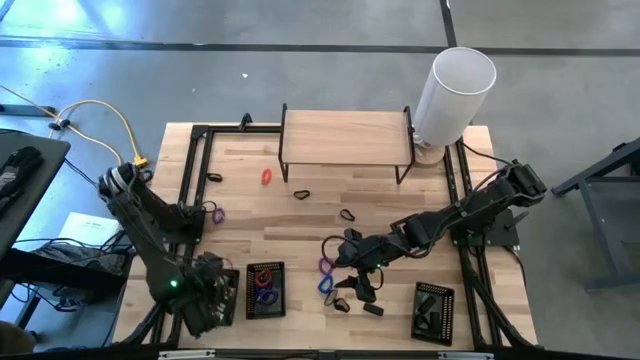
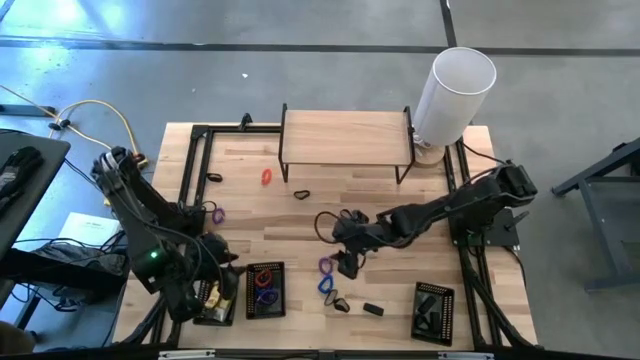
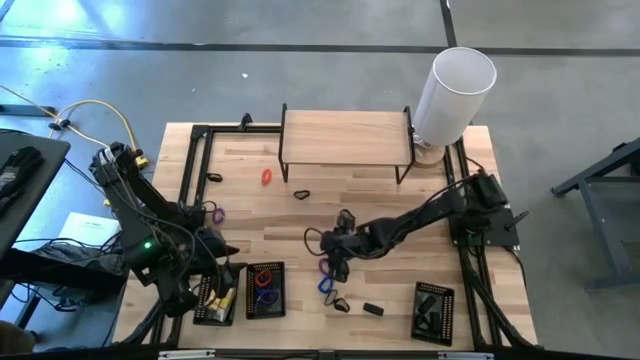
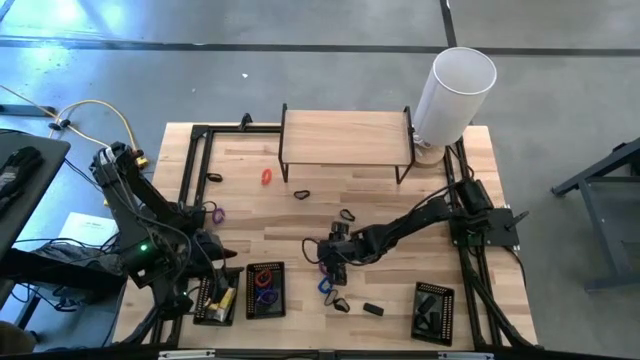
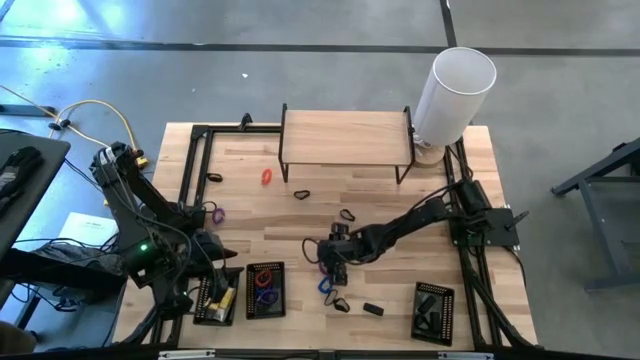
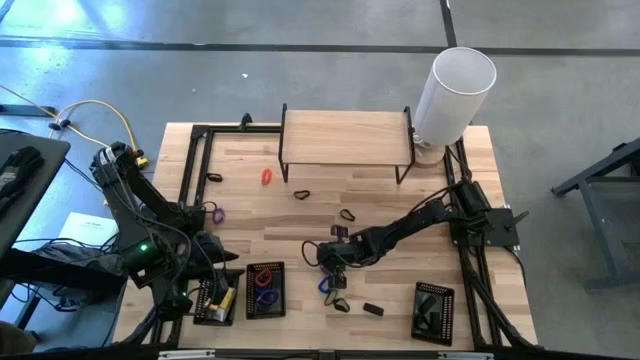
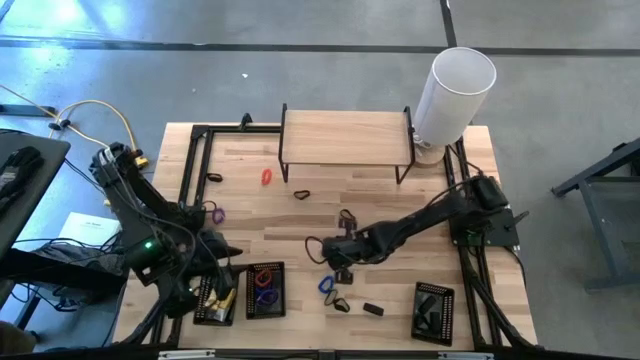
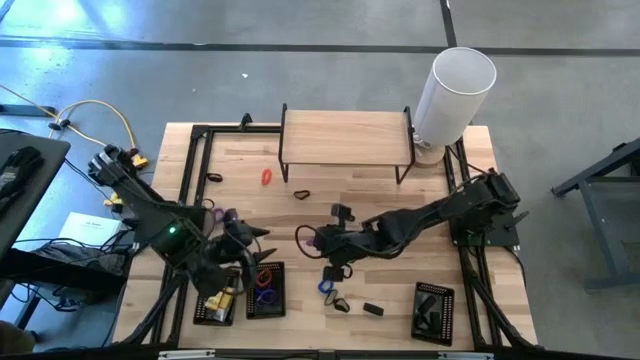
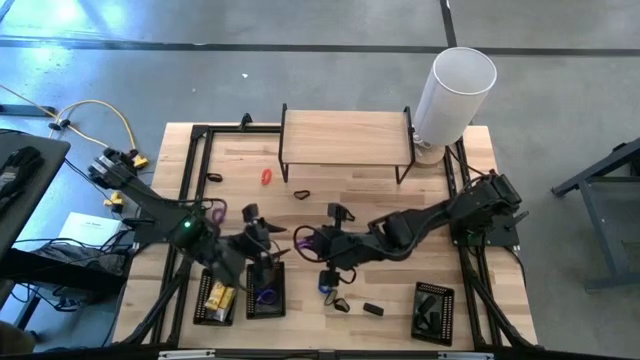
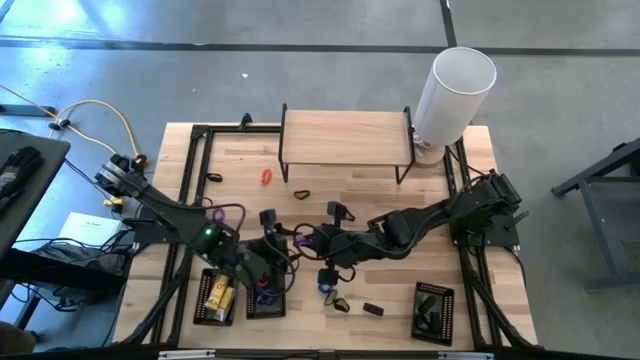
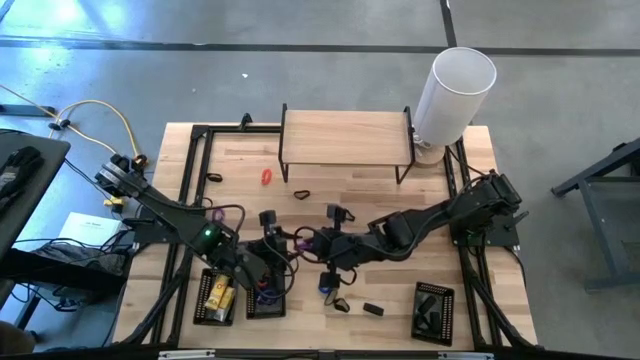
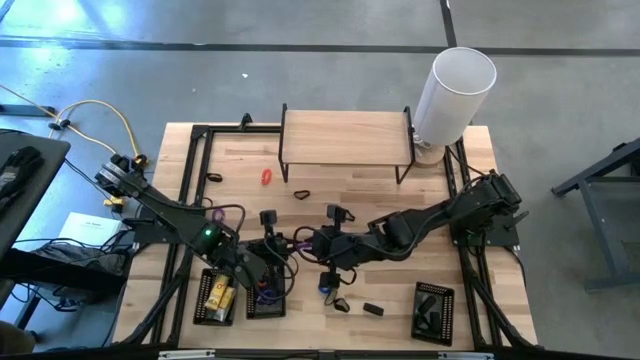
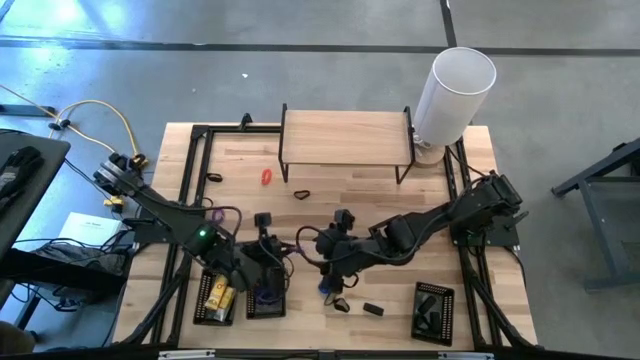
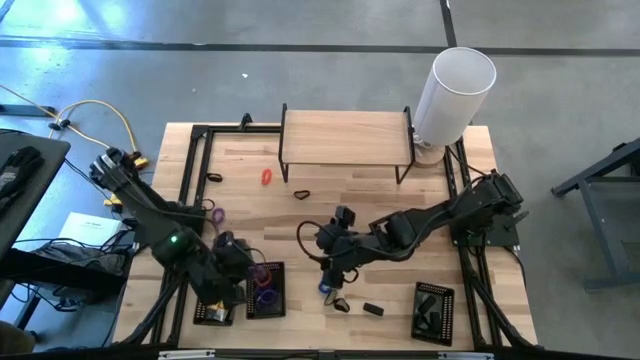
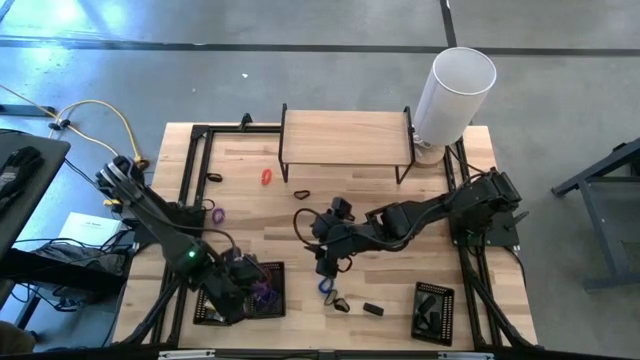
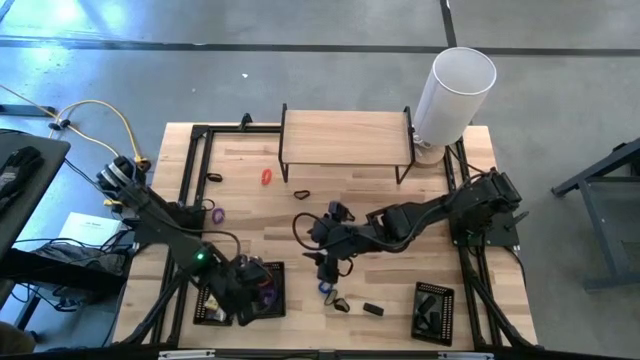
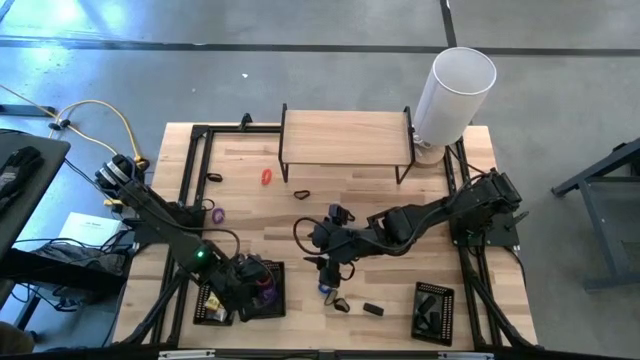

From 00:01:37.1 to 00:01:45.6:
Task: Pick & Place Office Desk Supplies
Put the violet spring key chain into the middle black basket

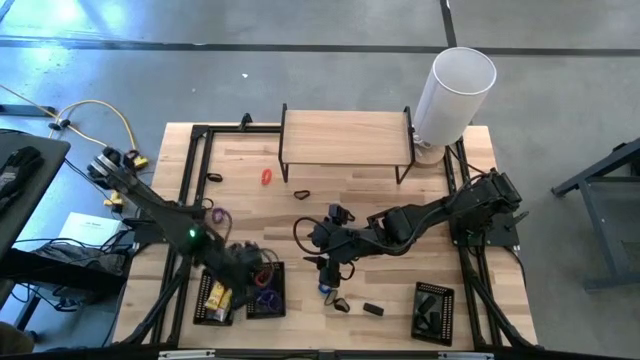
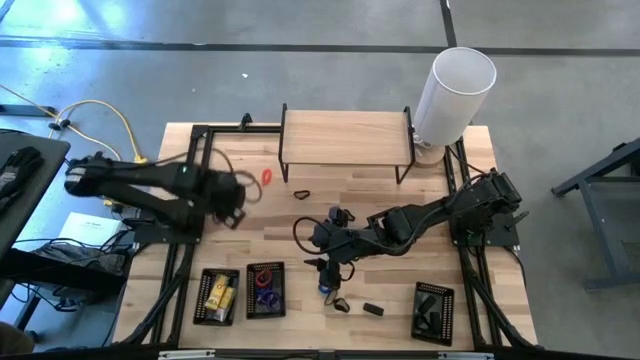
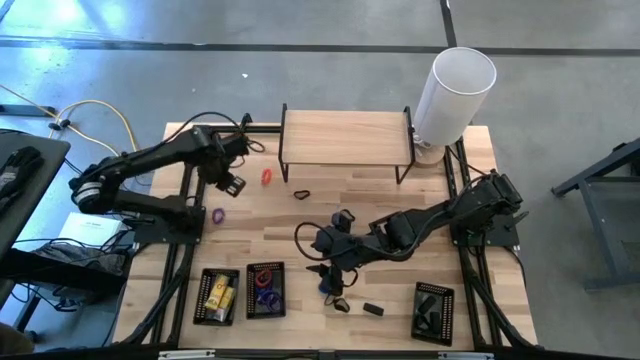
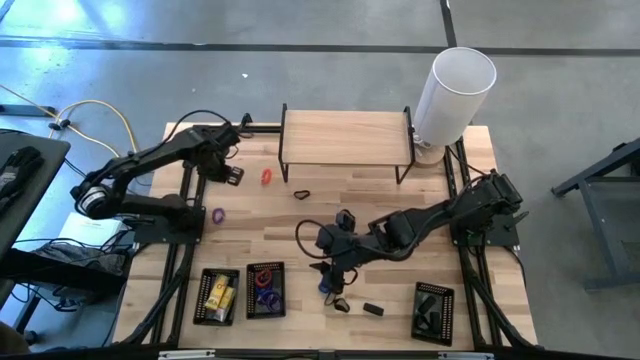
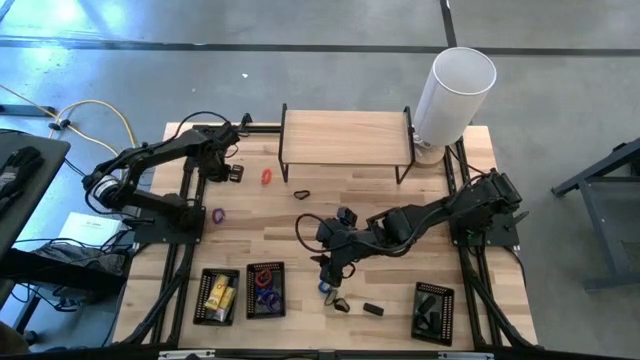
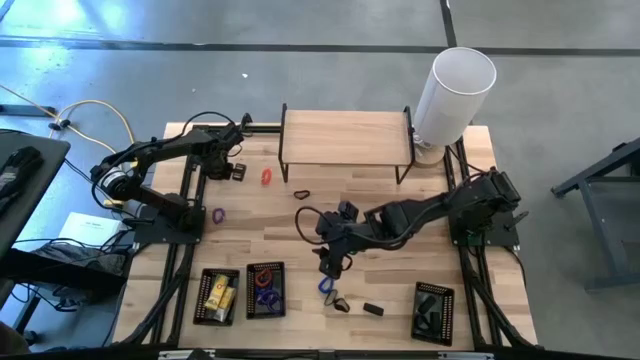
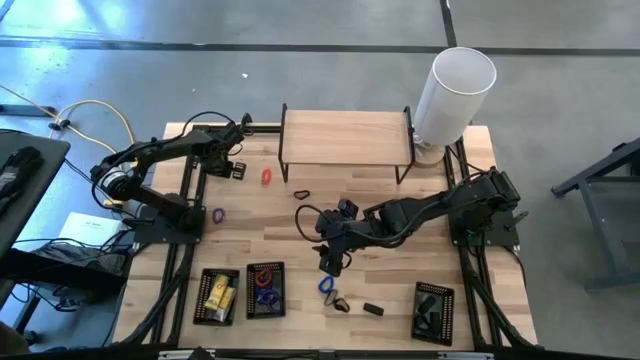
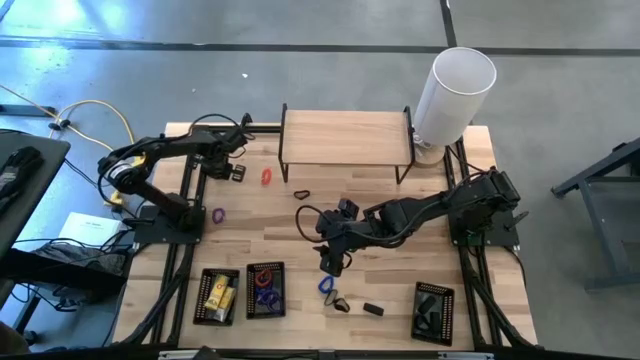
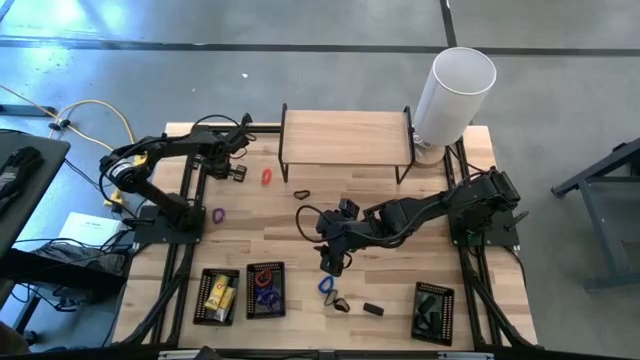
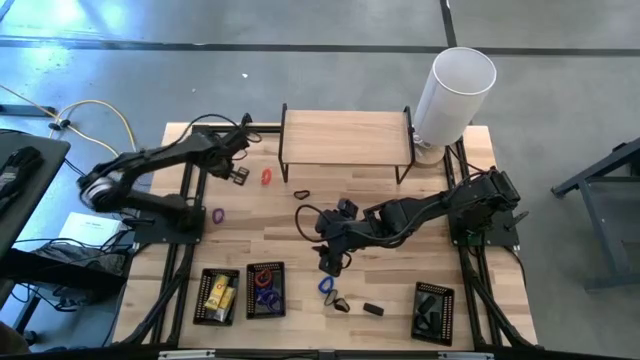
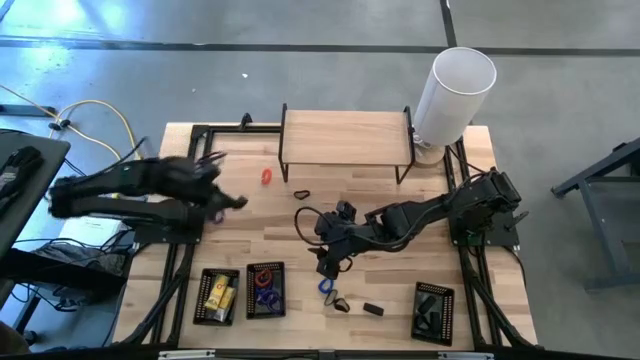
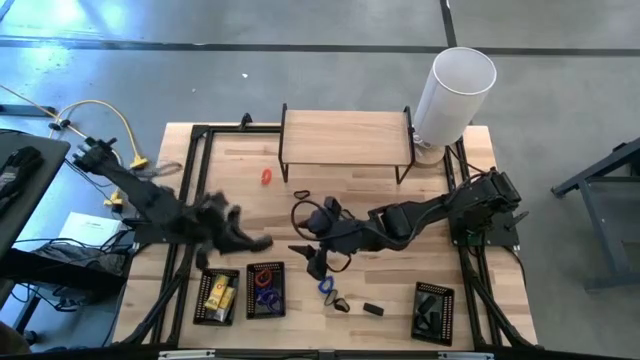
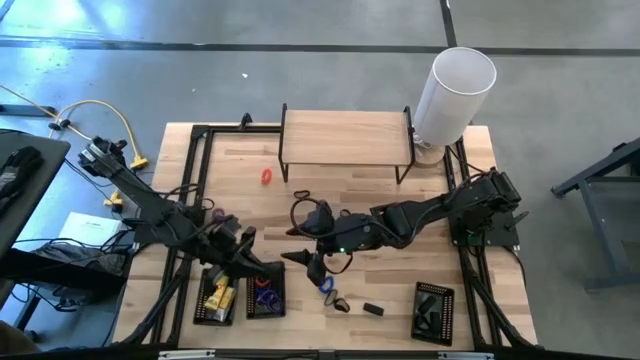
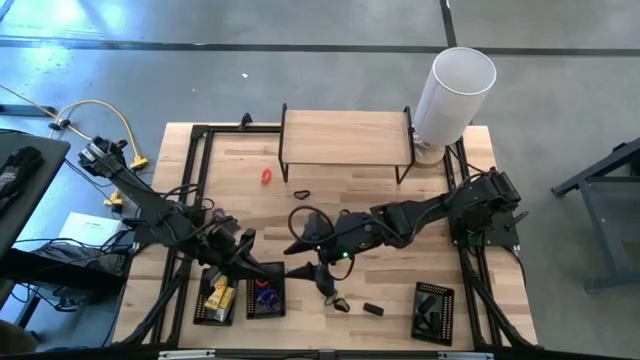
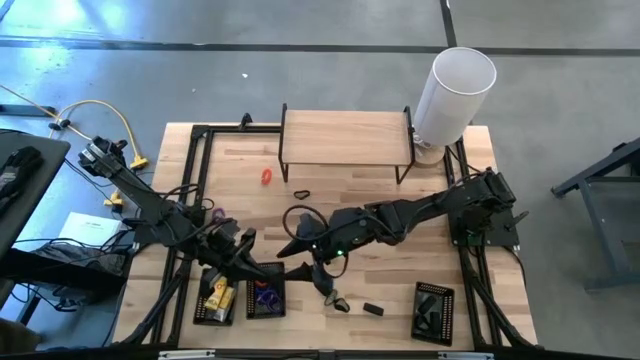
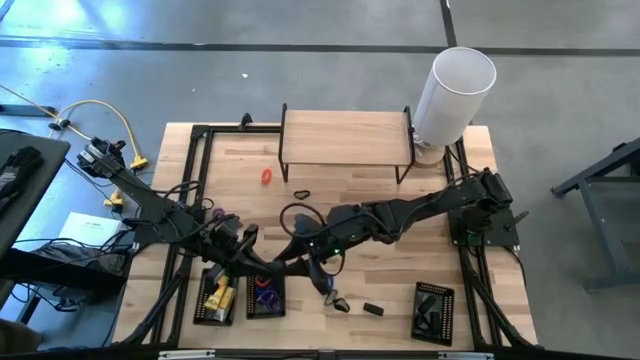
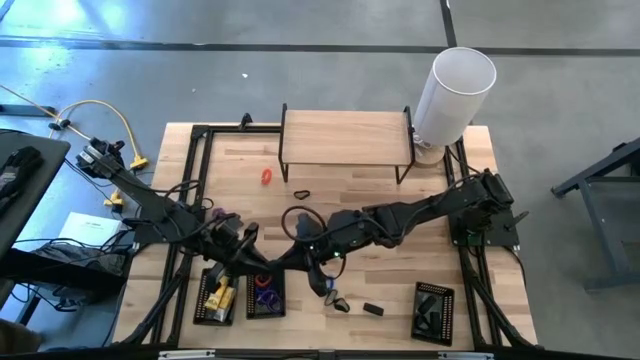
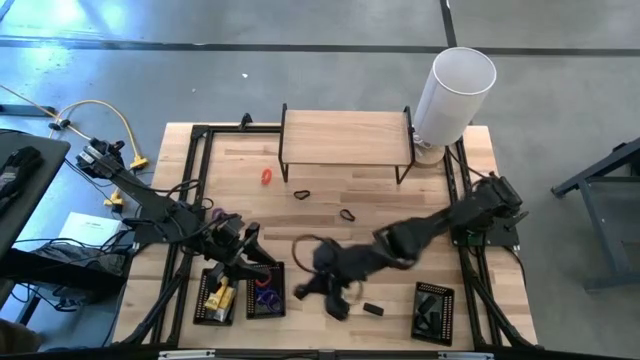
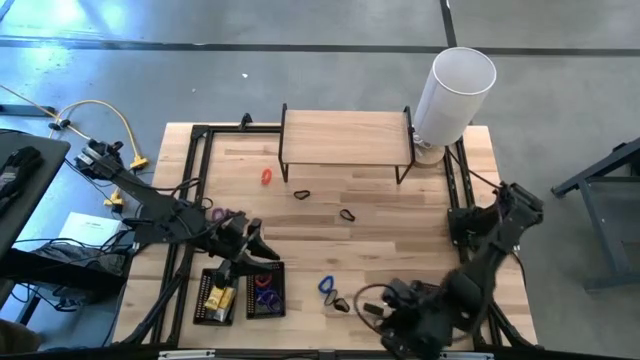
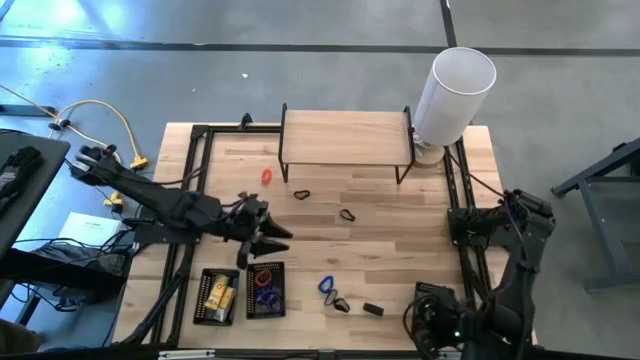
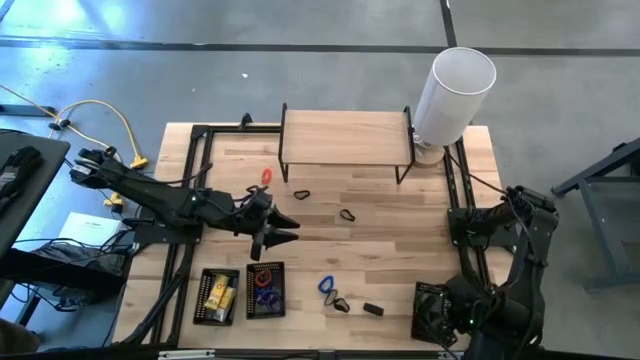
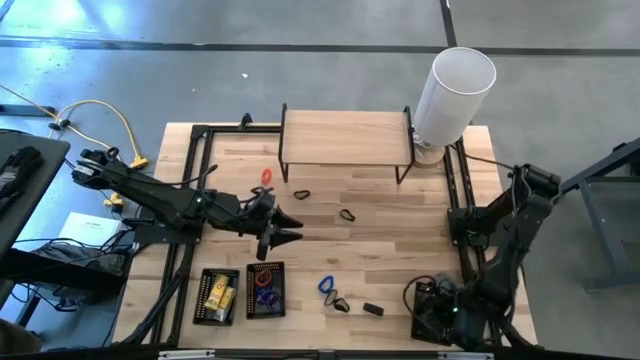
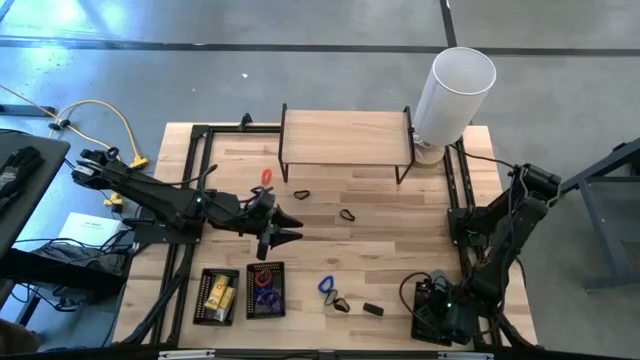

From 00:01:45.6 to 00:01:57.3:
Put the black rubber band into the right black basket
